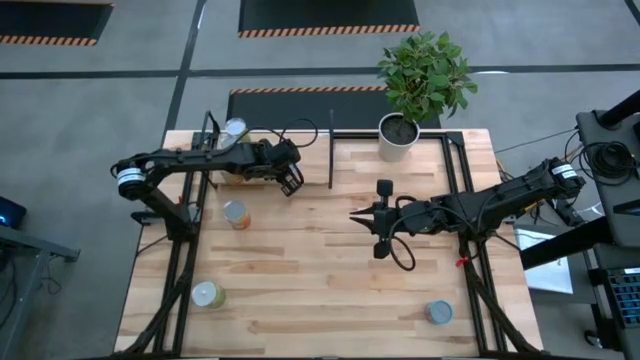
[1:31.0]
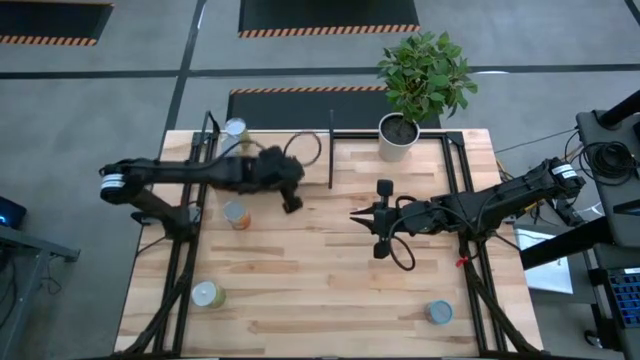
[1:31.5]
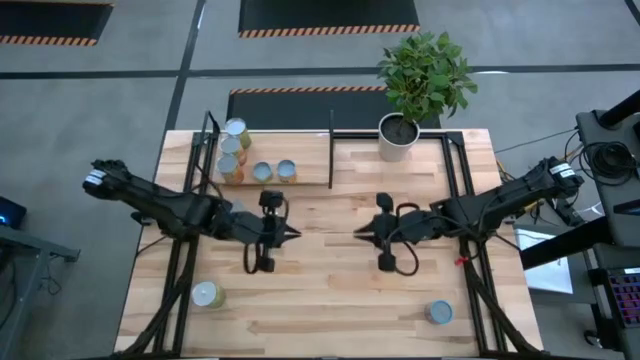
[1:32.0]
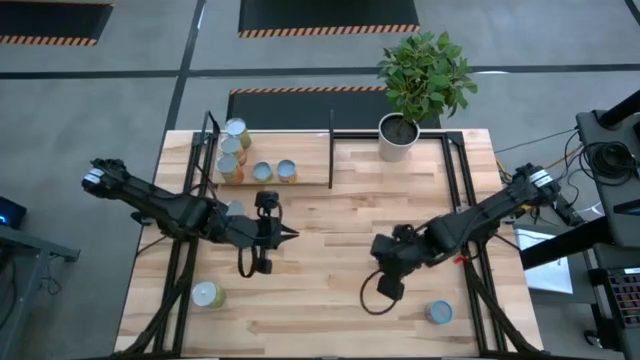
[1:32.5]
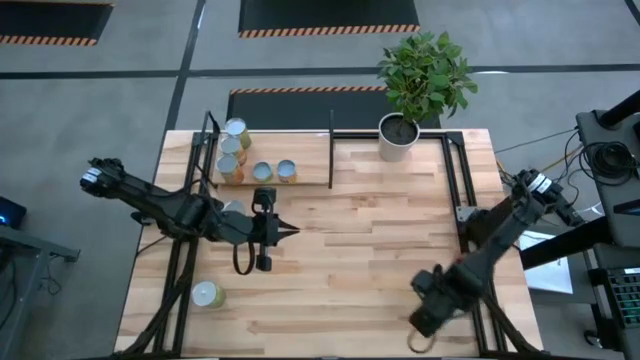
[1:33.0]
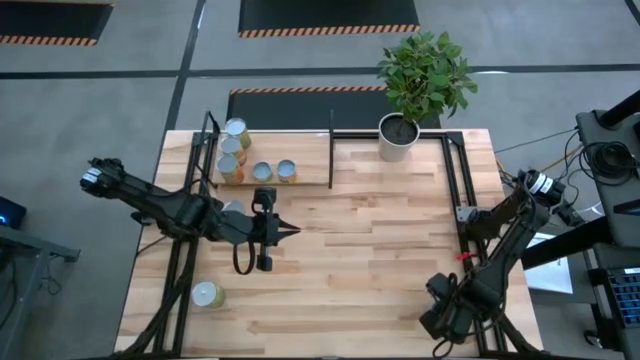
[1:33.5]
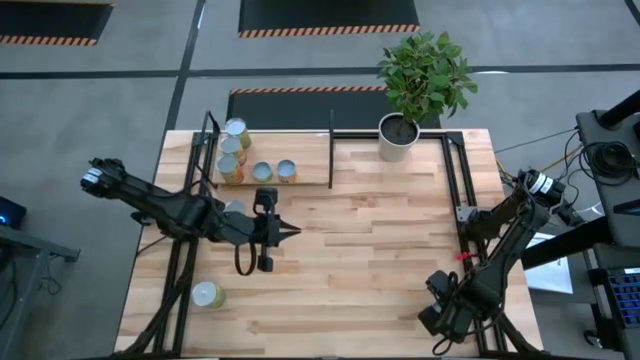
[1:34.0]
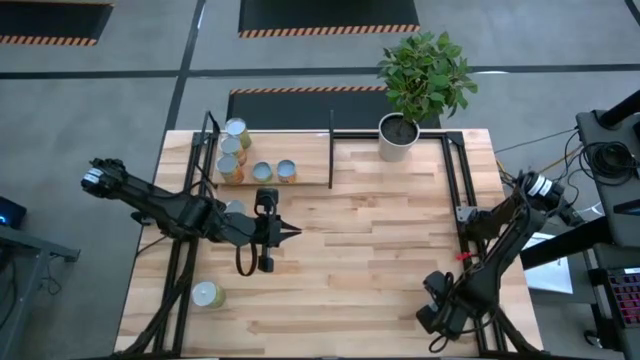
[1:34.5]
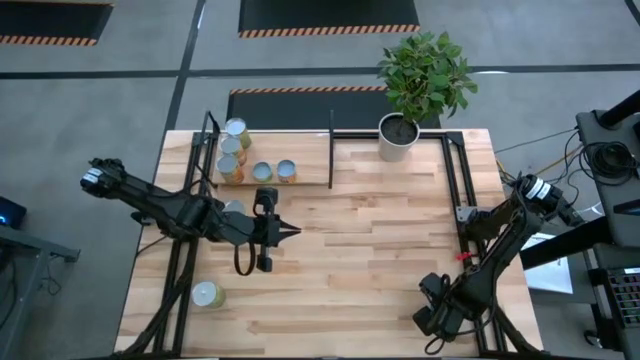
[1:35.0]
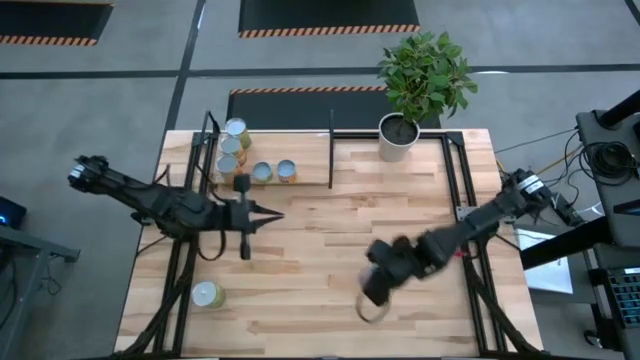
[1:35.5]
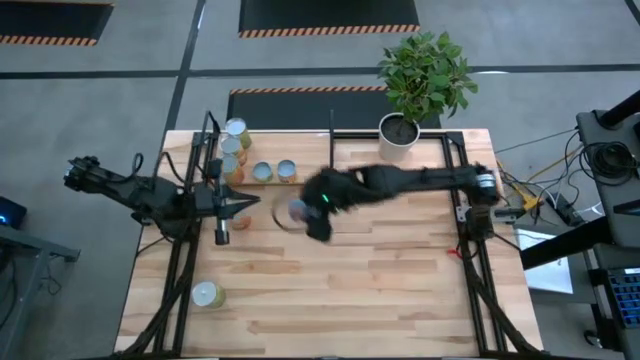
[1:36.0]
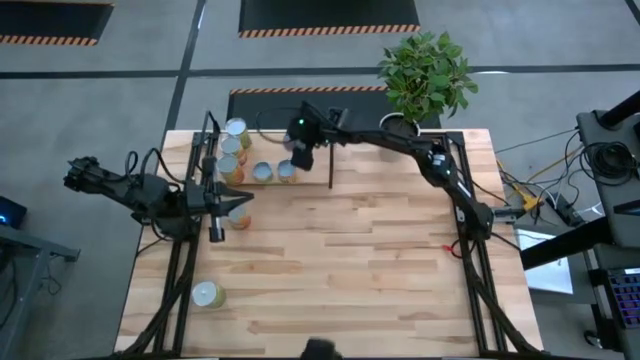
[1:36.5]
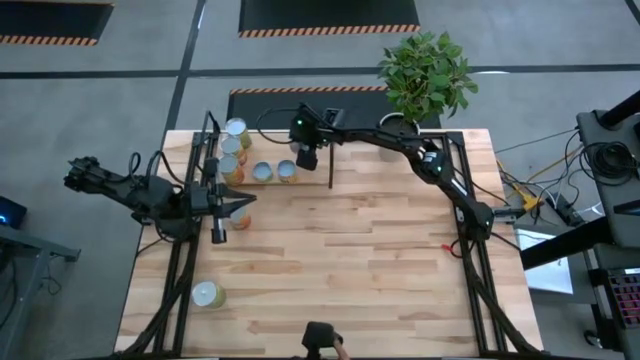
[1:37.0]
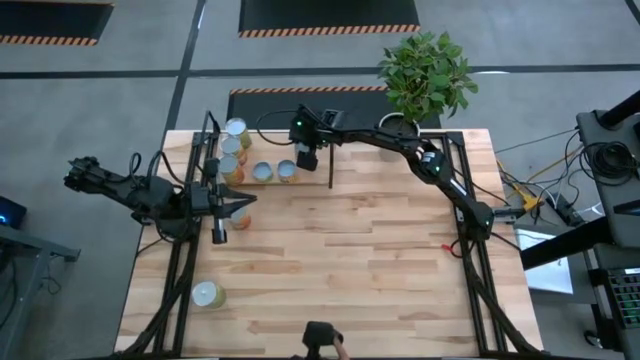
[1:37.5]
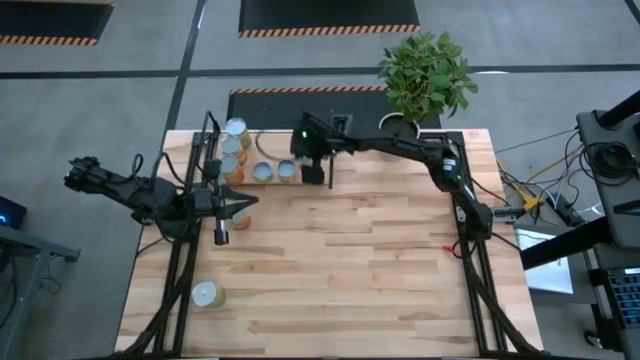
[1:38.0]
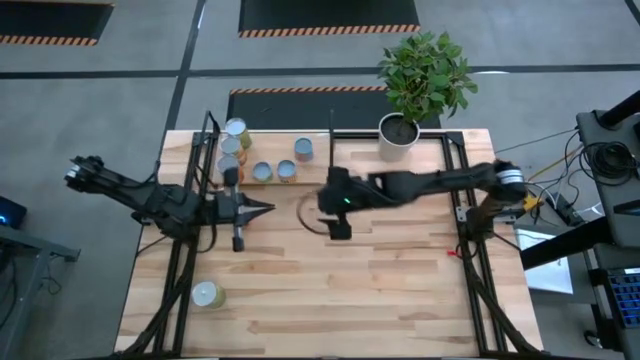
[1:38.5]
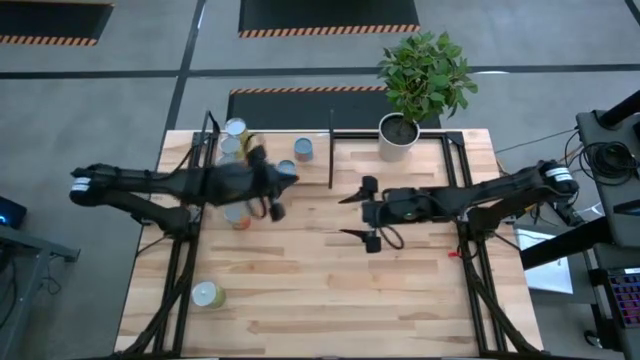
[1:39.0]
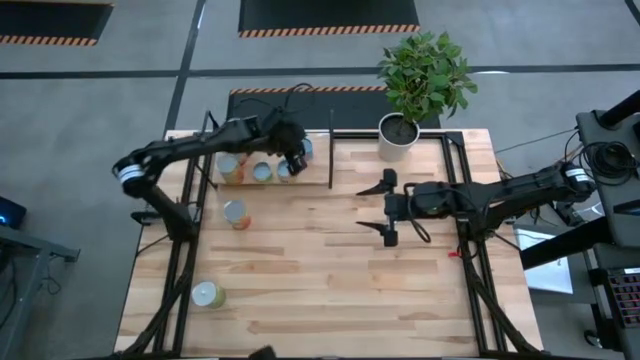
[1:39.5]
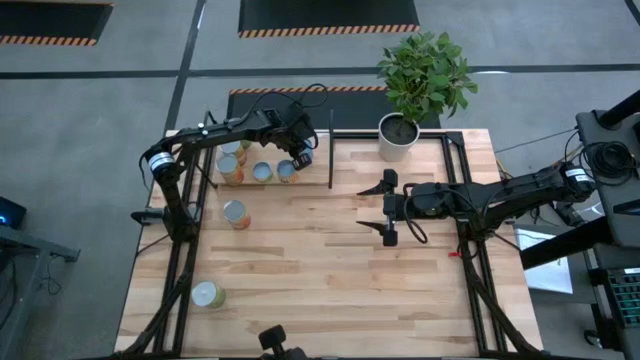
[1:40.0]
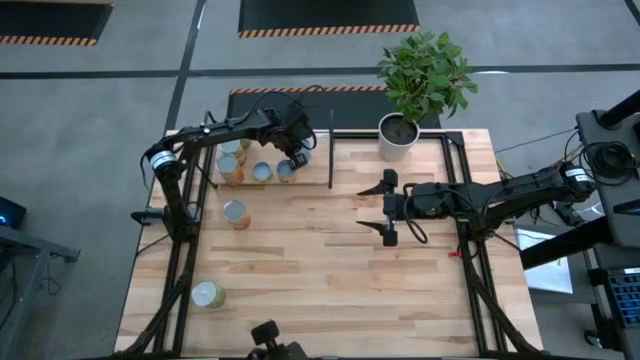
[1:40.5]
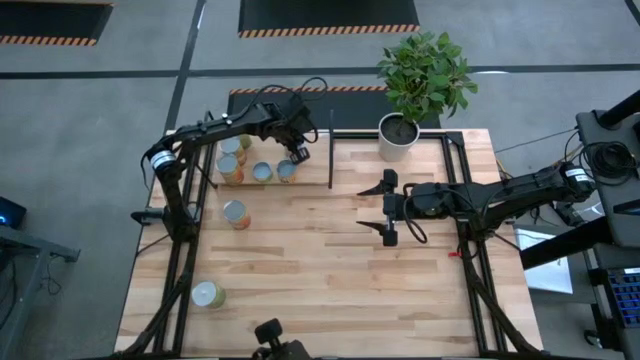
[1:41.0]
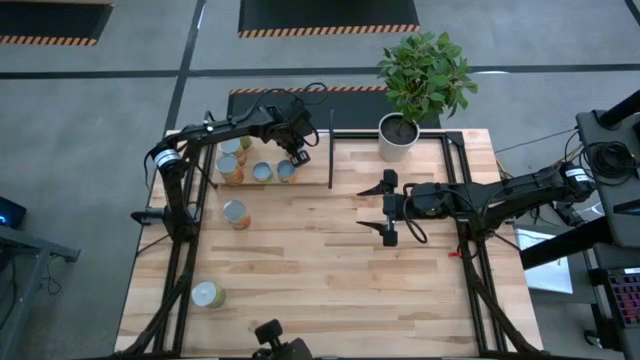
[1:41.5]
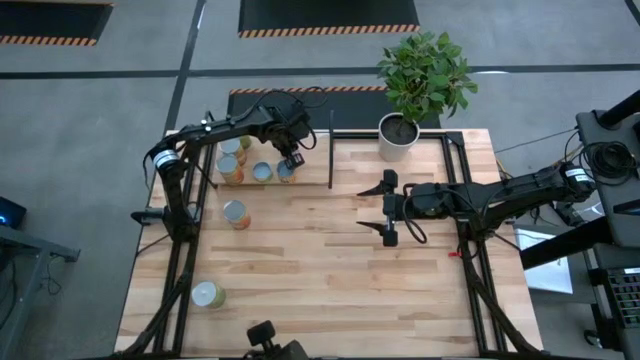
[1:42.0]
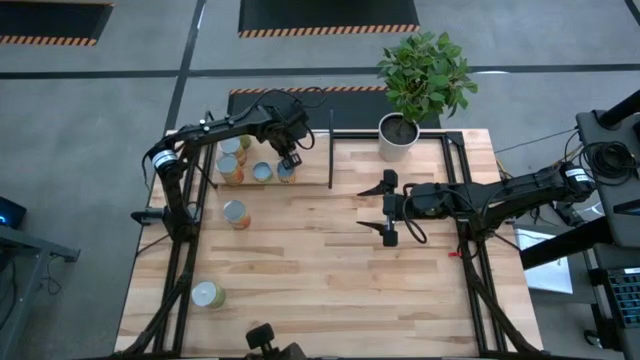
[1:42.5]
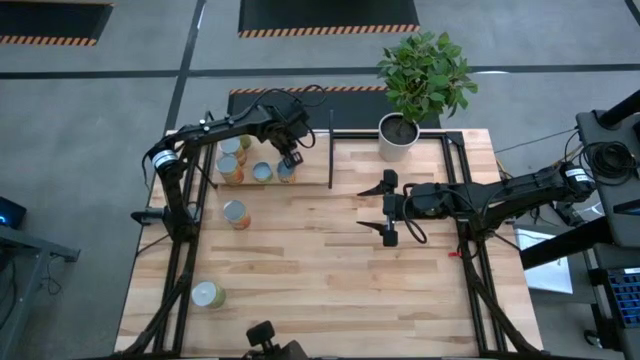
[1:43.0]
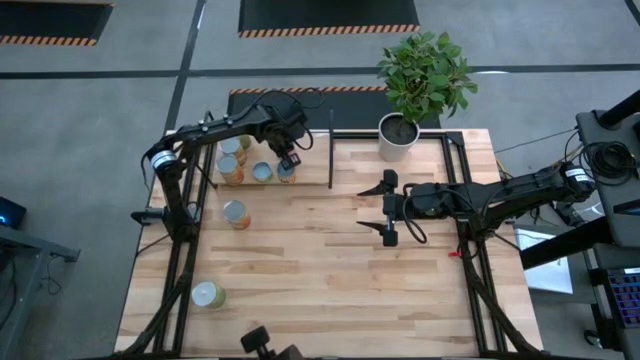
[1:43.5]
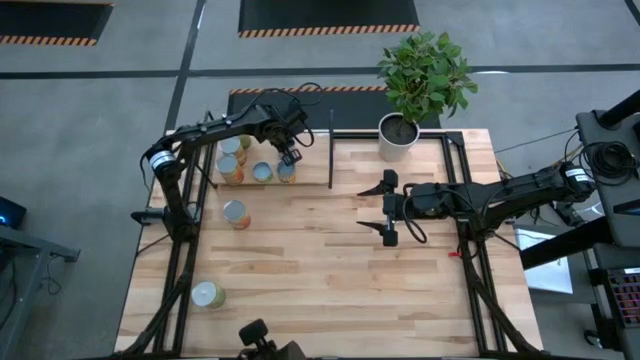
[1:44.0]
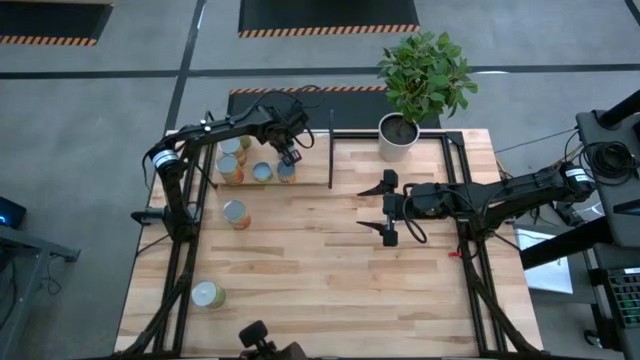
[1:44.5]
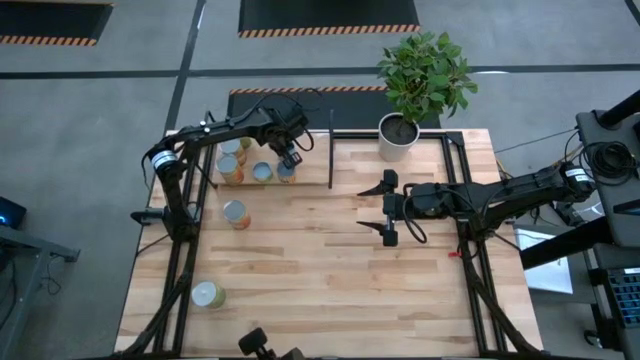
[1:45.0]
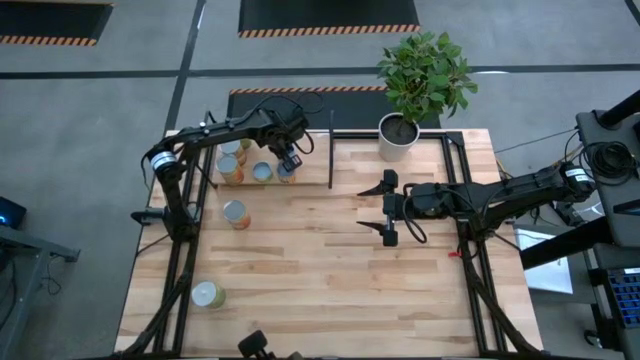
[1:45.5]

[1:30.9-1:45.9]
Task: Pick and place cans onto a shelf
Put the small blue corn can on the shelf

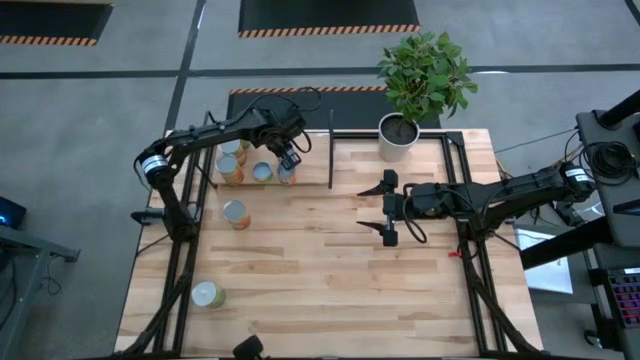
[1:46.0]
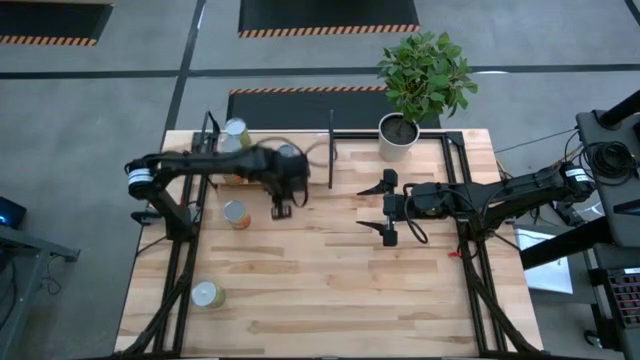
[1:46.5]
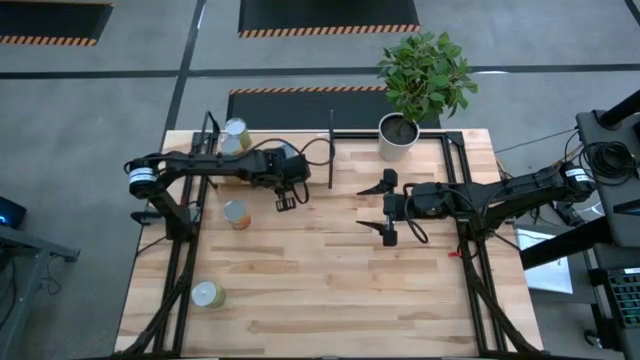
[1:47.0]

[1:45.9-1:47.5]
Adjust the yellow spicy beans can on the shelf

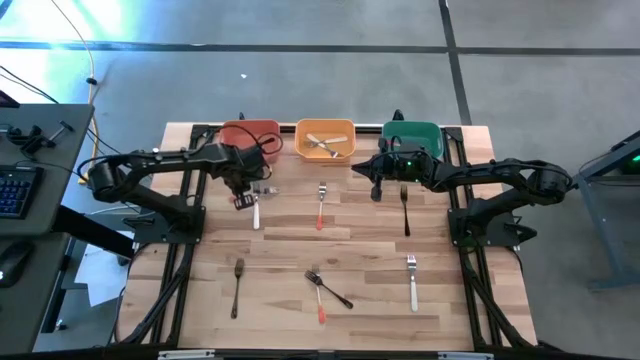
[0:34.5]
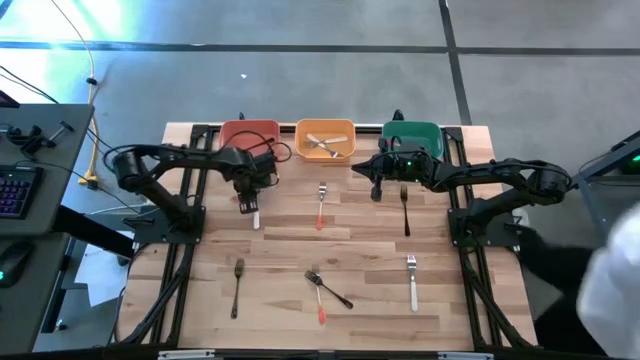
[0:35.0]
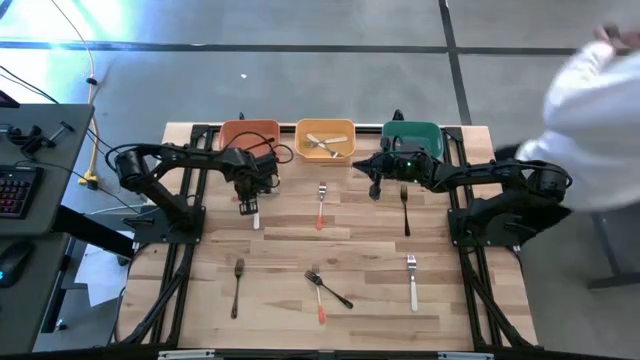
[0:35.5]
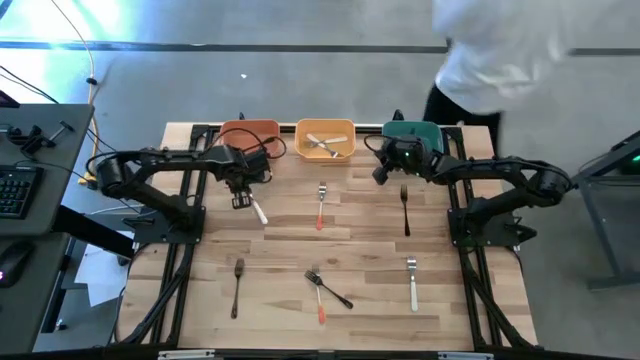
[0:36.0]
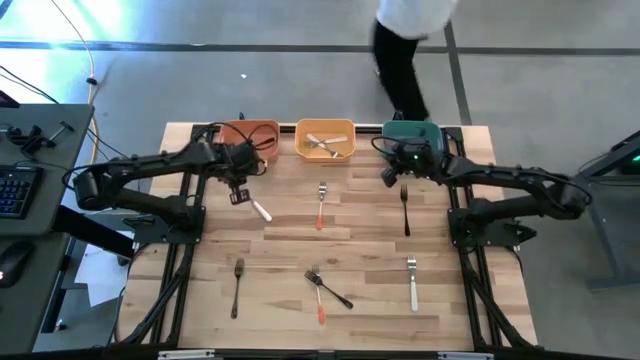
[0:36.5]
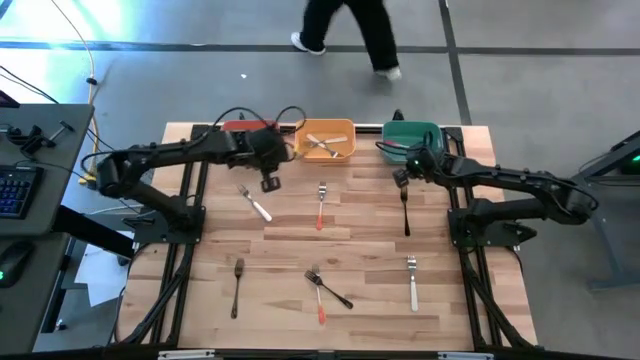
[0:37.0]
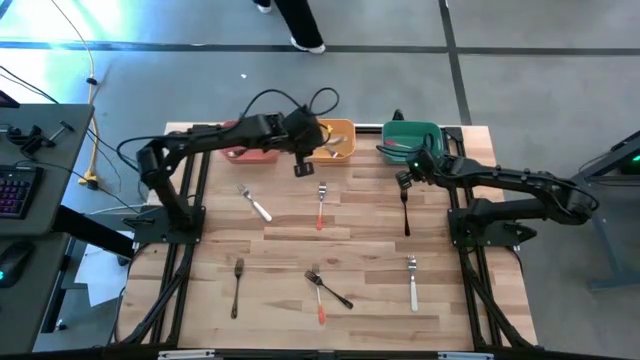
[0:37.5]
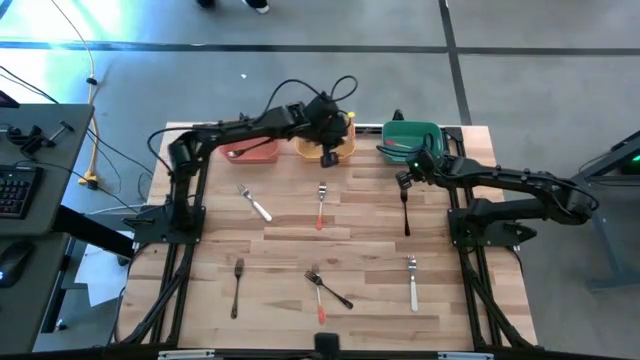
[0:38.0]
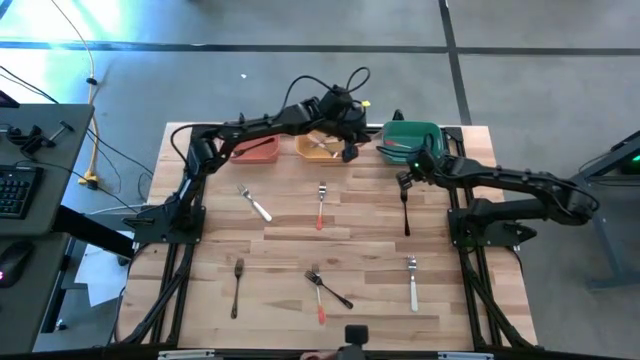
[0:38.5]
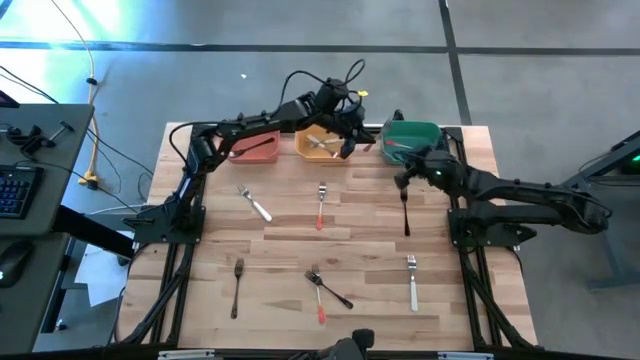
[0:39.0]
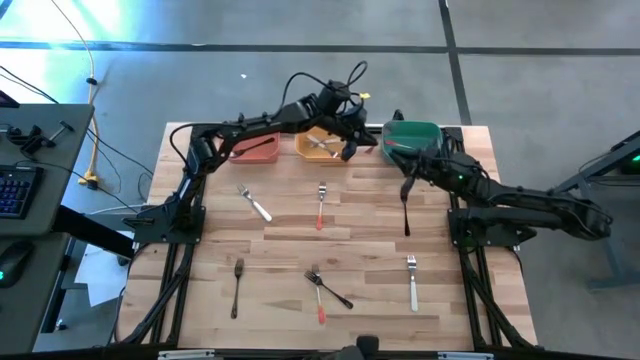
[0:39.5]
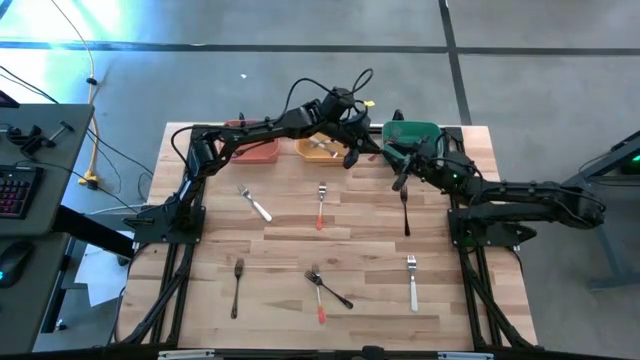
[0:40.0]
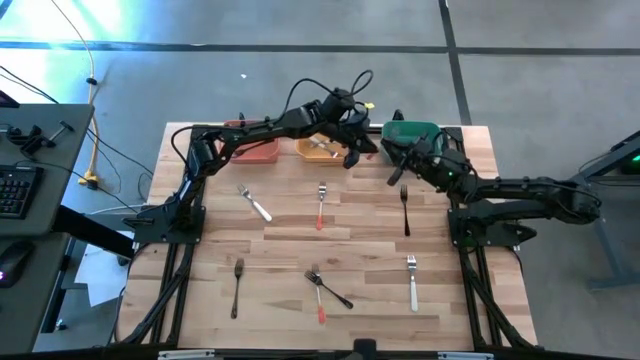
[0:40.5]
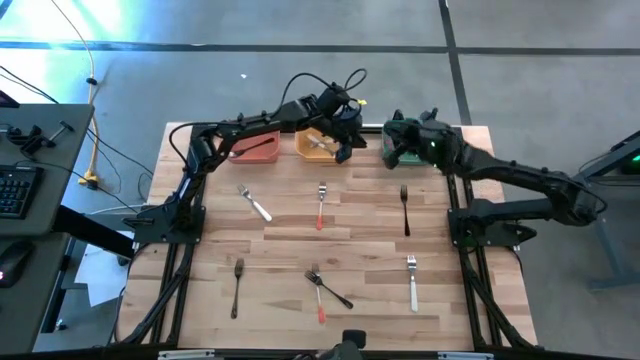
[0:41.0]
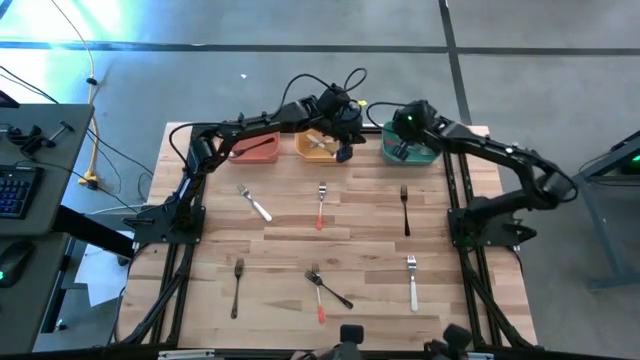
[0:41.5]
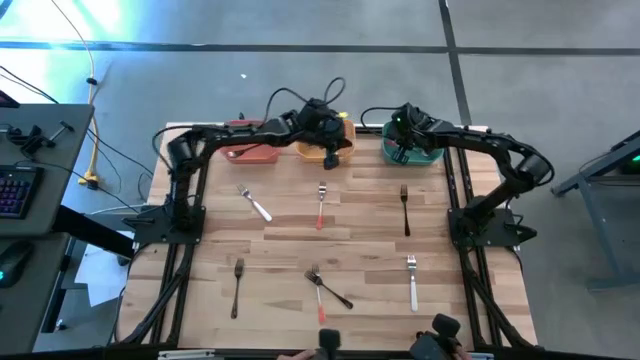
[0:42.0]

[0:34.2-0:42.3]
Task: Sort silverware by color (type)
Put the top left orange fork into the green bin
